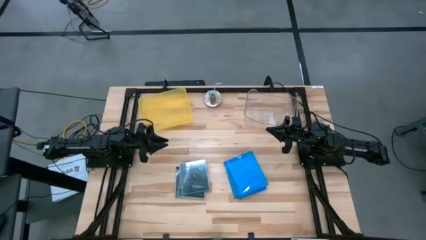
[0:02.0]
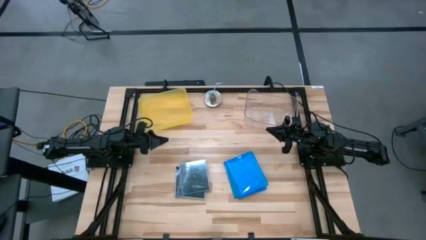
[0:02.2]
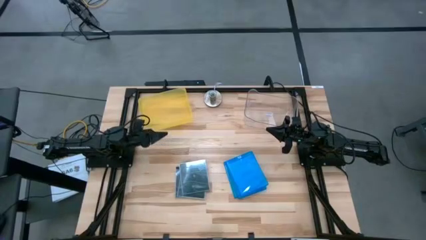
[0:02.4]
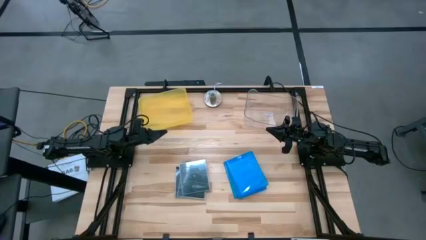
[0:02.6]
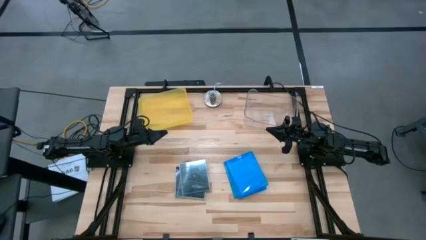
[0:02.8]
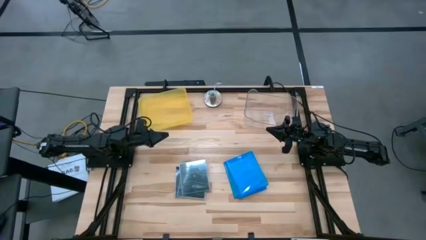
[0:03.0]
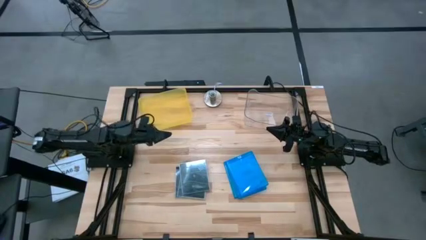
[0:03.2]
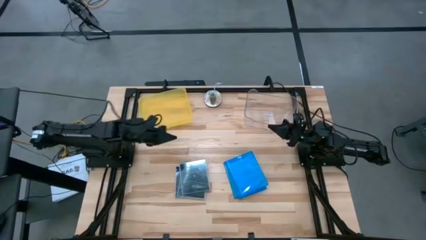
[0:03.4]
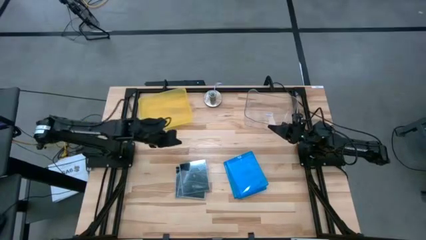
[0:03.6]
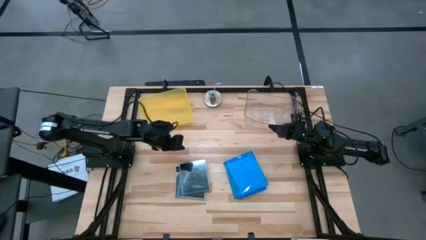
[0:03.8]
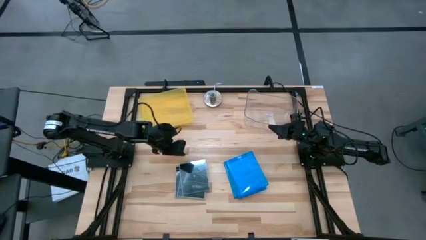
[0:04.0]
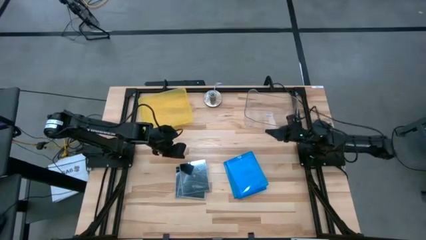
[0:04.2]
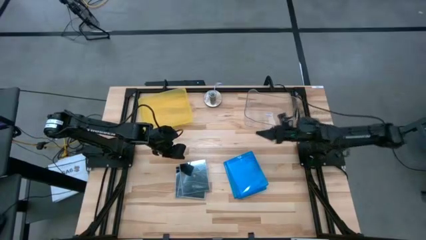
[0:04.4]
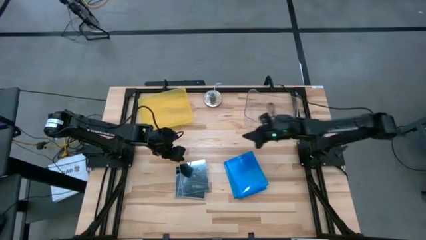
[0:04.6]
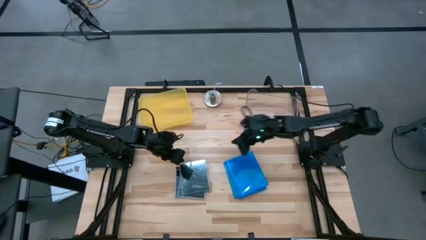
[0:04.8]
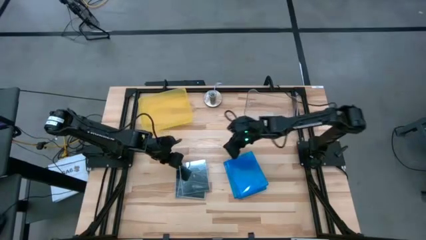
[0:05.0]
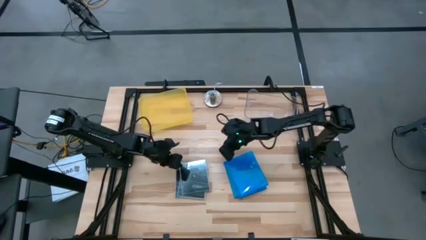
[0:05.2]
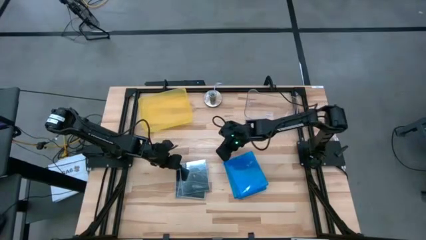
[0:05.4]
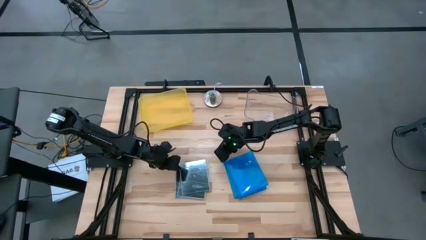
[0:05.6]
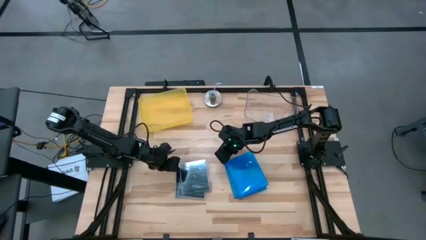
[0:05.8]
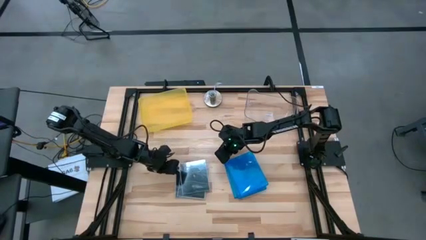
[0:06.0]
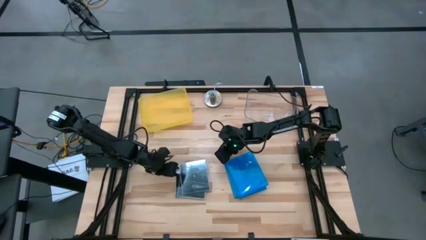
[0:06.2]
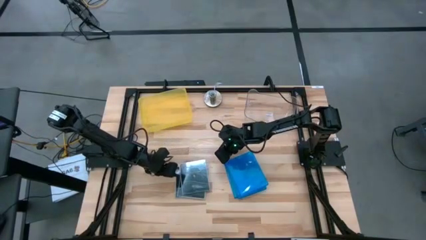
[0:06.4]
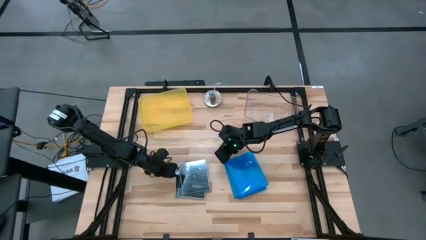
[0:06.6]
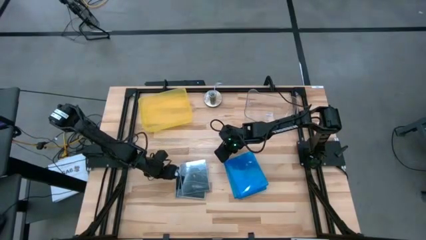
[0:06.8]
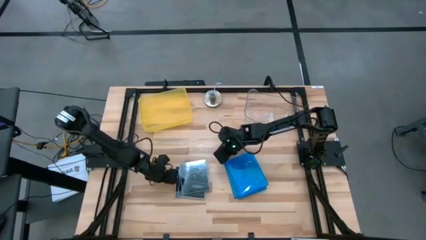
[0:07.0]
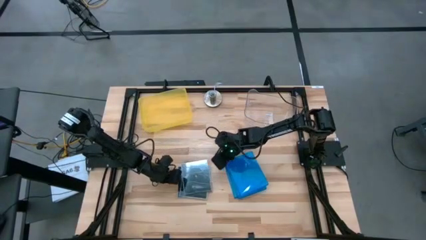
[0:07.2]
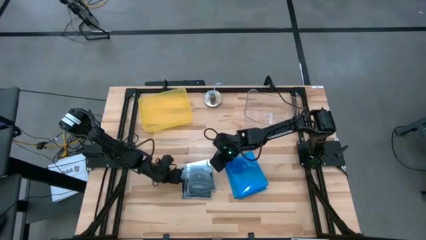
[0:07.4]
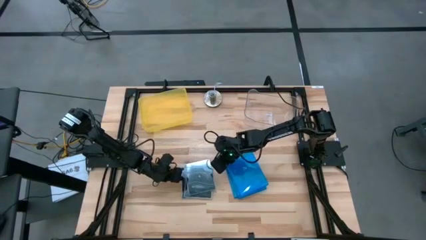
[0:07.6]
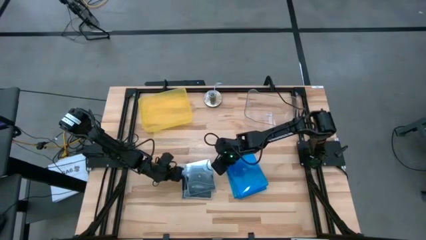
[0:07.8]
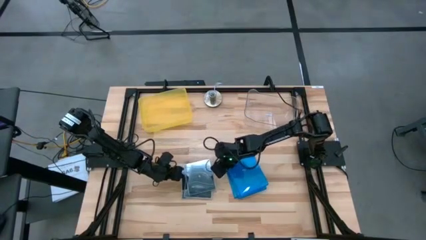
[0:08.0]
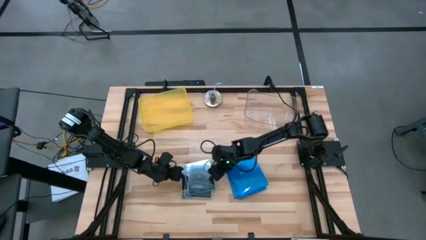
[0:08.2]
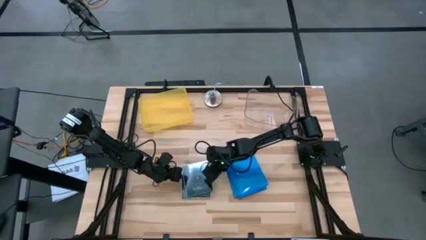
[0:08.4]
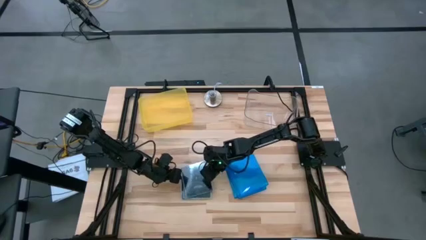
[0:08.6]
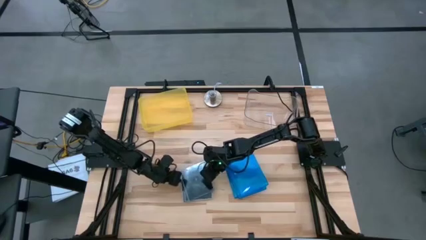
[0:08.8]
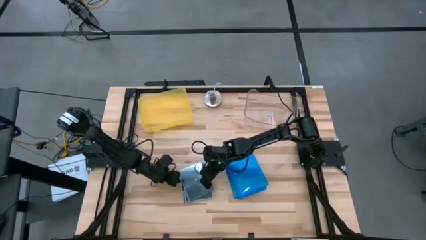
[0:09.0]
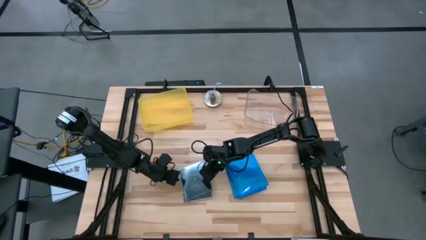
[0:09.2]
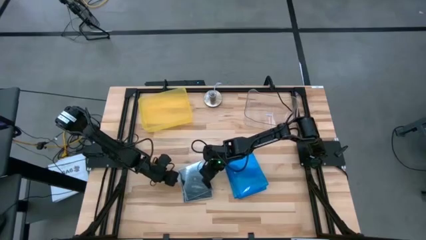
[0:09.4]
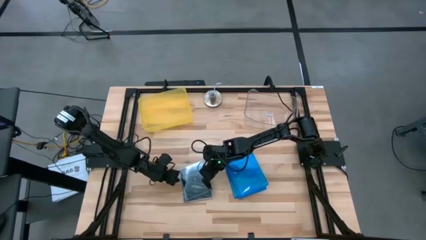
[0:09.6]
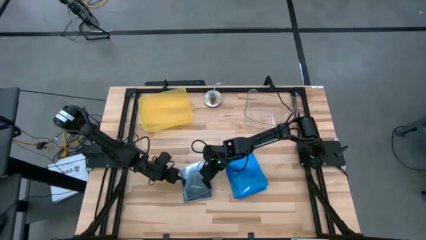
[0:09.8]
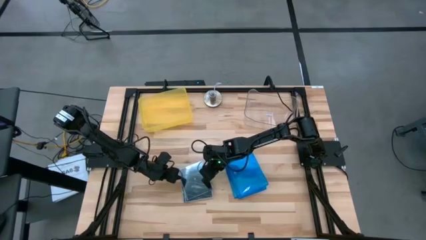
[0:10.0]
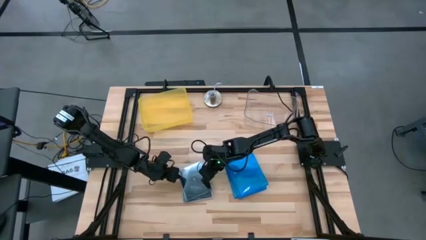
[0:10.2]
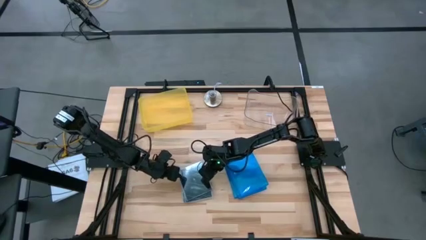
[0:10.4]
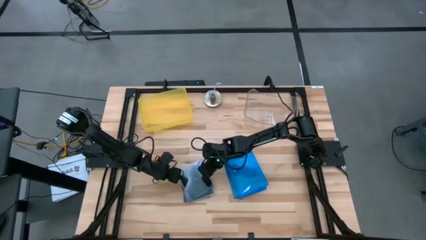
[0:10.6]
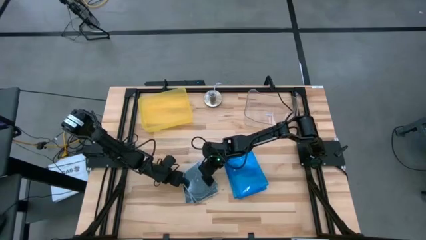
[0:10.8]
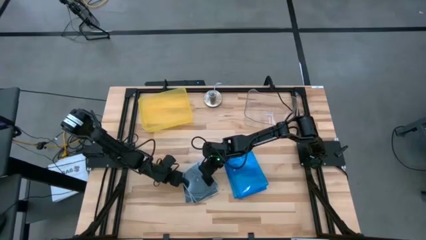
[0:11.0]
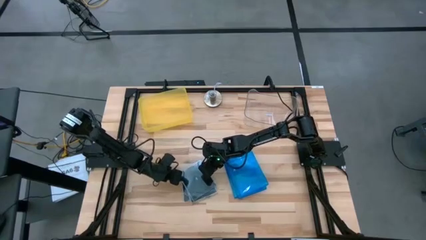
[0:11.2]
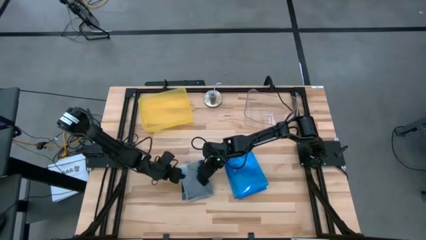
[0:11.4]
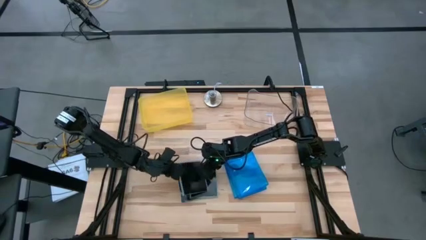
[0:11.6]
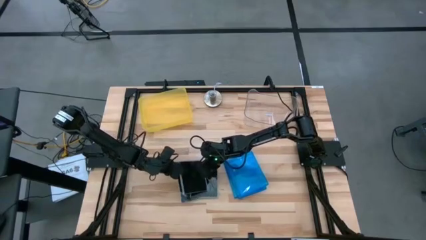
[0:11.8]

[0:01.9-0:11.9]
Task: Pick & place jewel cases by type
Put the black CD case into the yellow bin

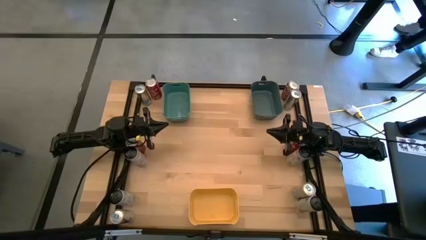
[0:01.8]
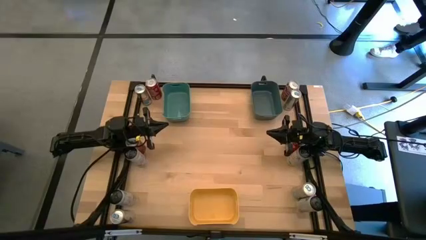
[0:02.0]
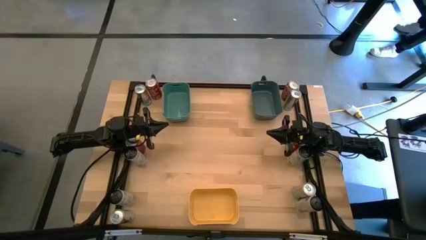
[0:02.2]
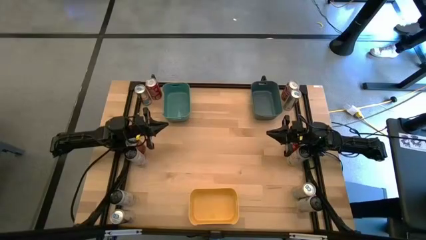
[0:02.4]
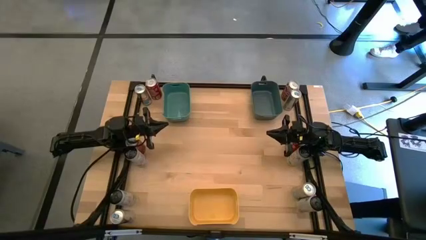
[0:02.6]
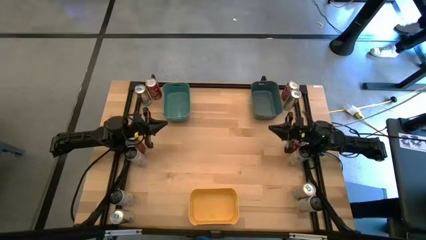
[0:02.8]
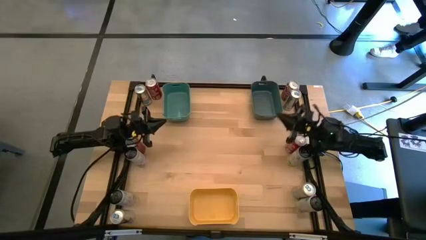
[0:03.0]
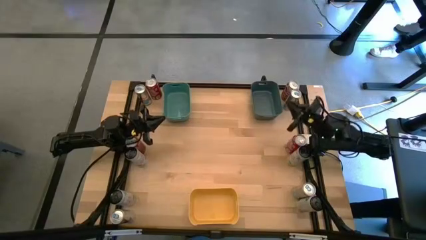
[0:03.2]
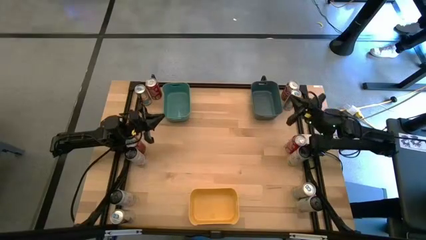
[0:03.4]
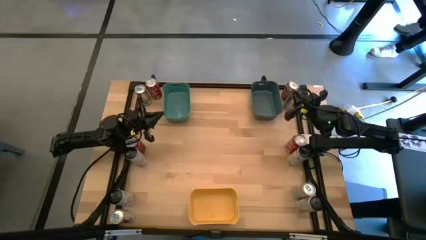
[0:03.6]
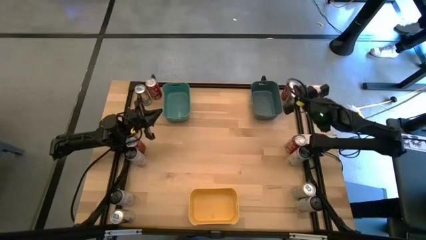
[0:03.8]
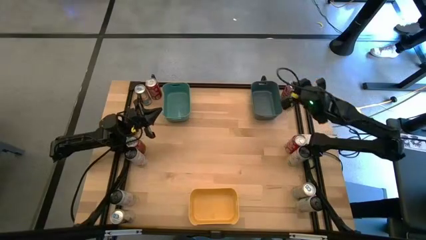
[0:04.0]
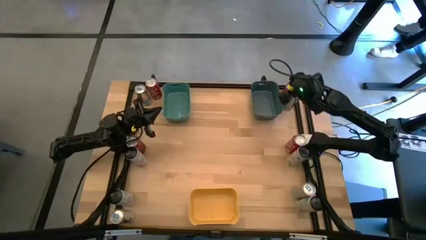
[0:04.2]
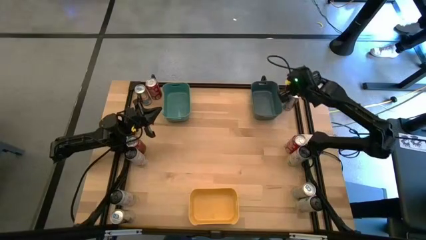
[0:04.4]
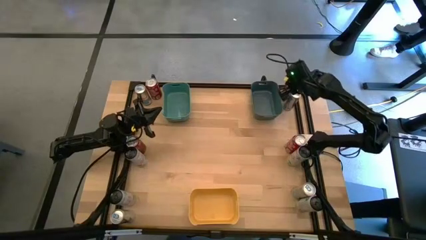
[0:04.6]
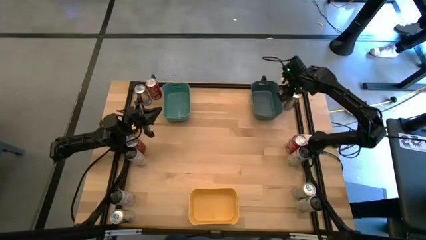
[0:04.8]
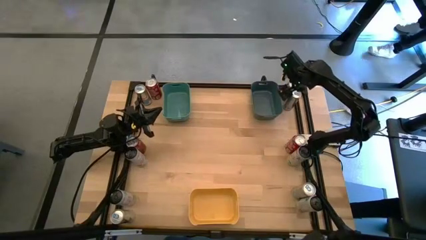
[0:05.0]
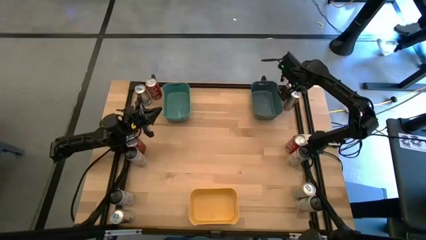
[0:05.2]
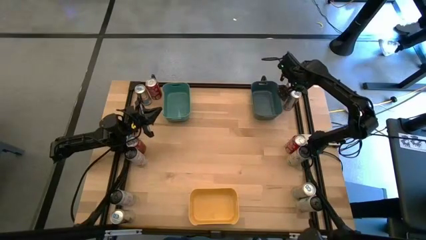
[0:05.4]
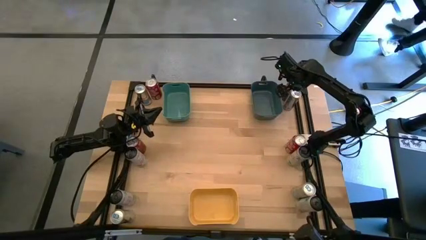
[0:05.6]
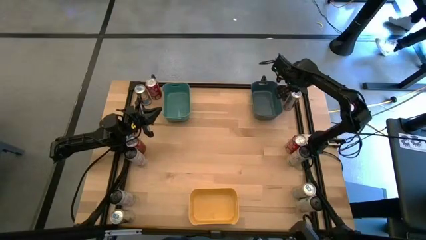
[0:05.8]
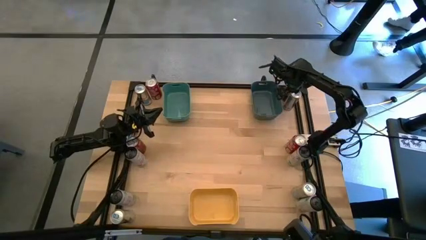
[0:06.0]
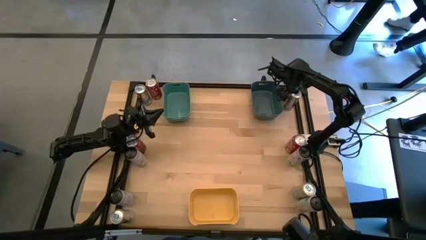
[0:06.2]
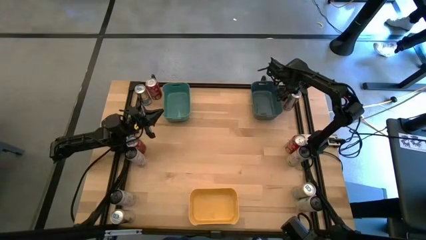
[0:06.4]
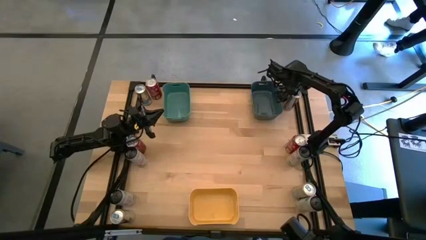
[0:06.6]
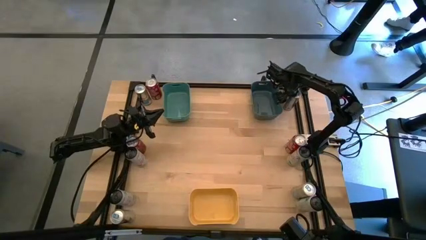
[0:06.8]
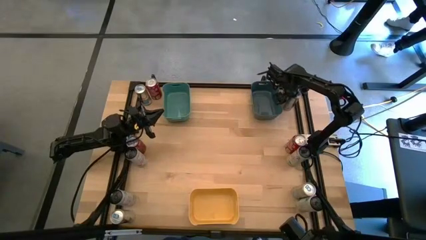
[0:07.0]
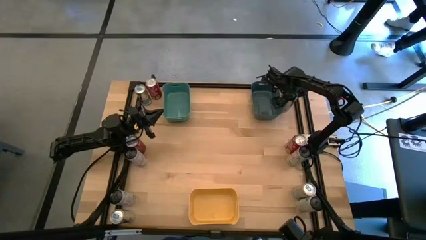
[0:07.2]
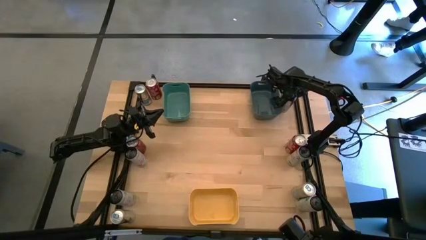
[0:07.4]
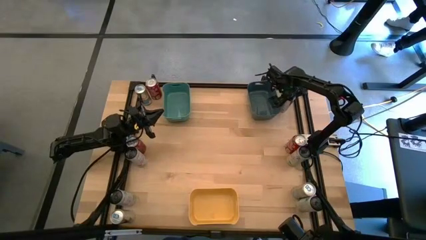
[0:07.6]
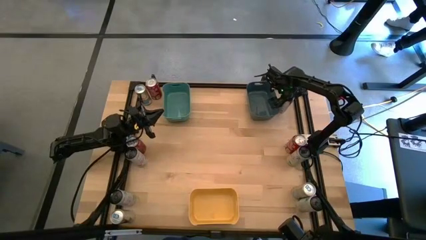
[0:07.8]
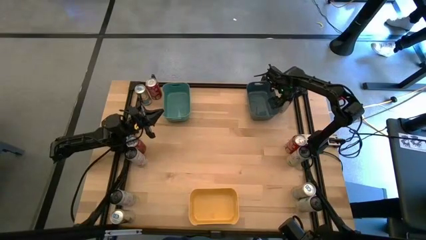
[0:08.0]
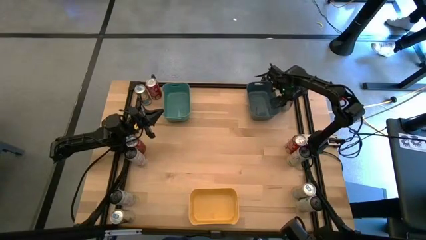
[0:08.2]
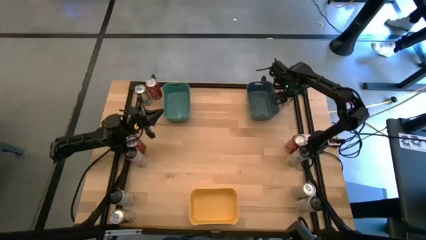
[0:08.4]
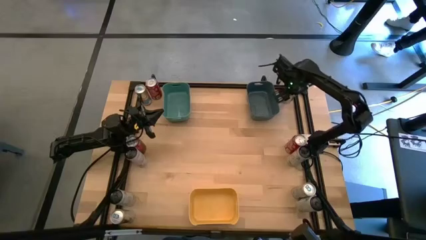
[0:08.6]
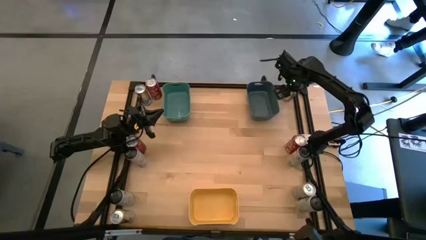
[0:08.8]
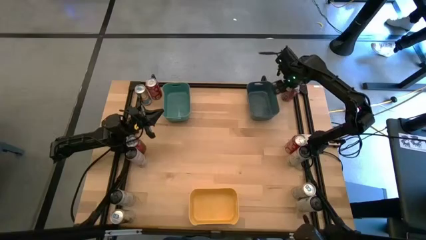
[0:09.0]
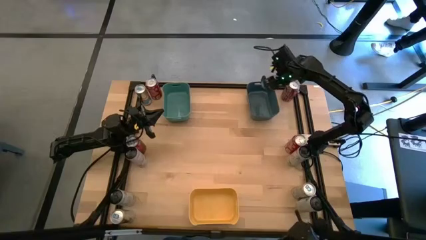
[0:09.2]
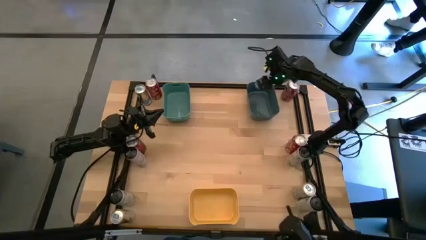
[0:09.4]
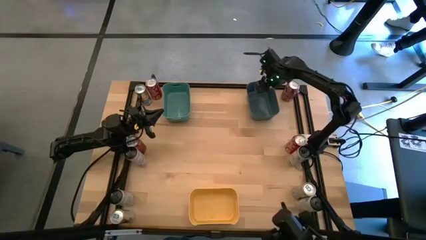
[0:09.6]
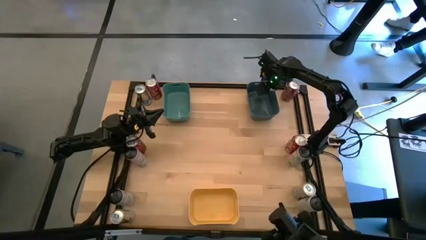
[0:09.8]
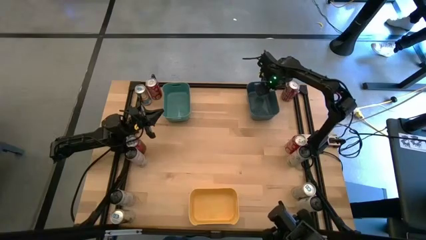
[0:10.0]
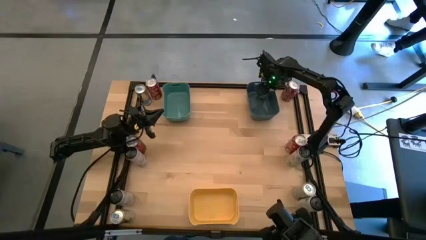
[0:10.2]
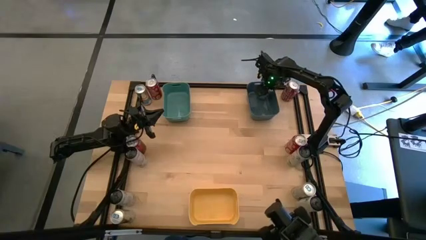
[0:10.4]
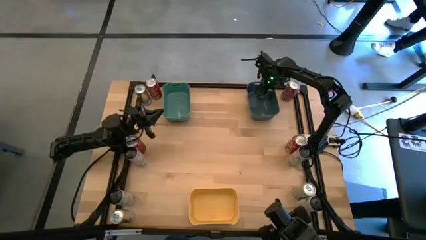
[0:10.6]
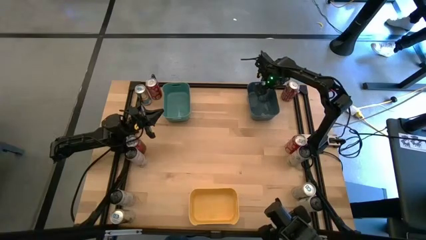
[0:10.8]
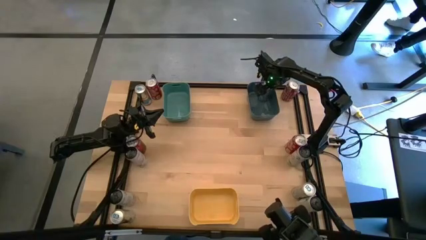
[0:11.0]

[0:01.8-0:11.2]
Task: Sort soda cans
Put the top right blue soda can into the blue bin
